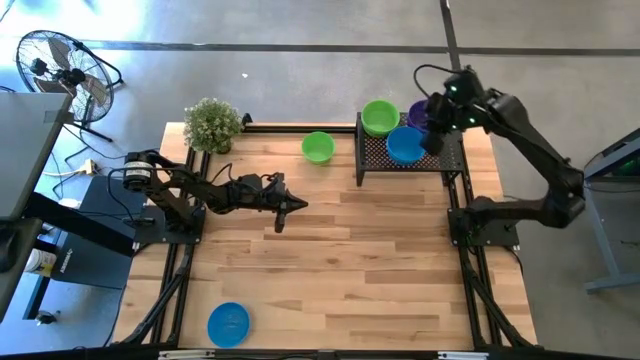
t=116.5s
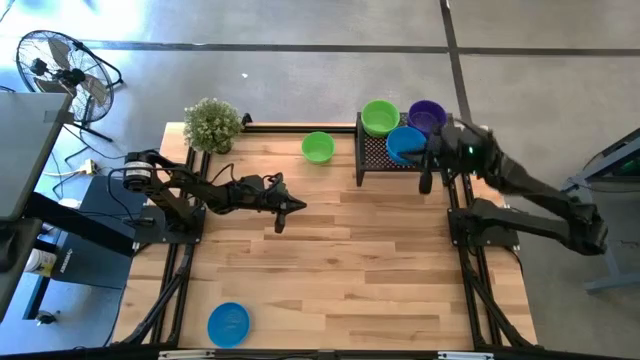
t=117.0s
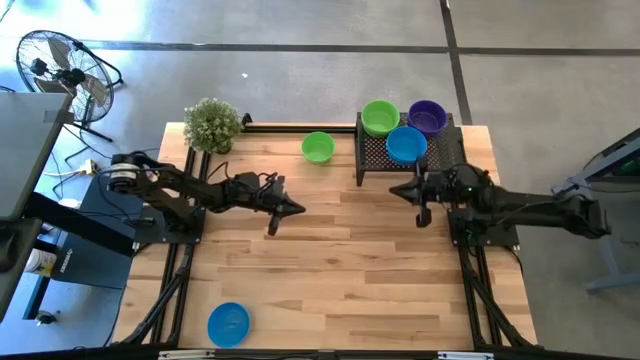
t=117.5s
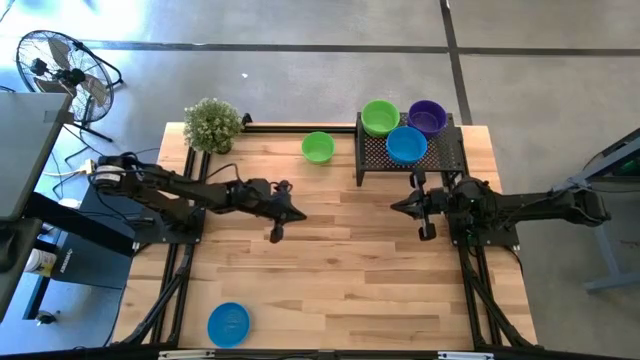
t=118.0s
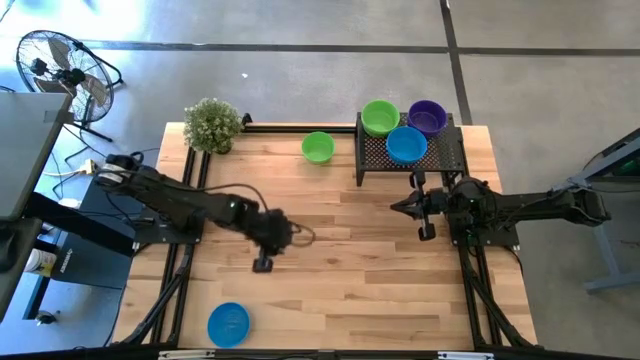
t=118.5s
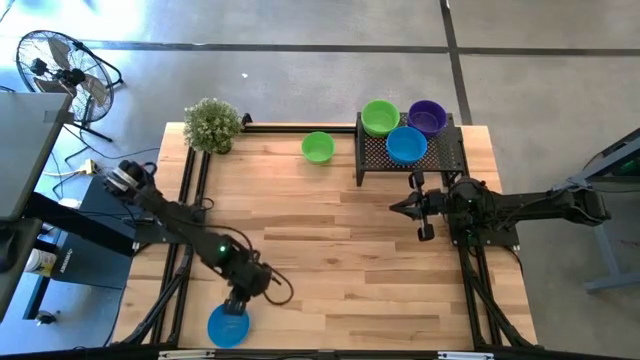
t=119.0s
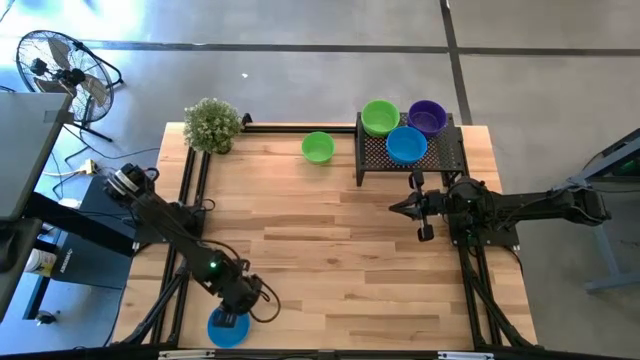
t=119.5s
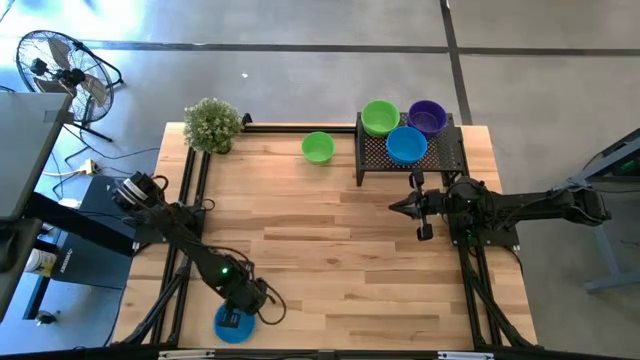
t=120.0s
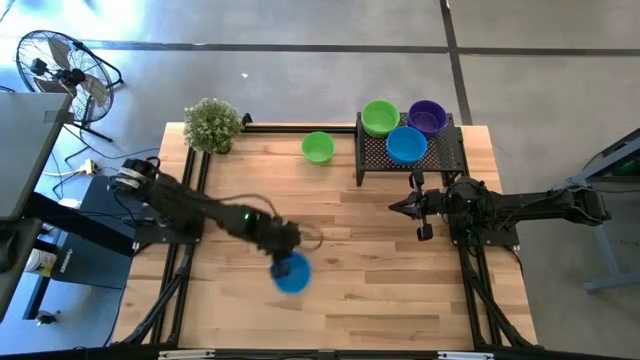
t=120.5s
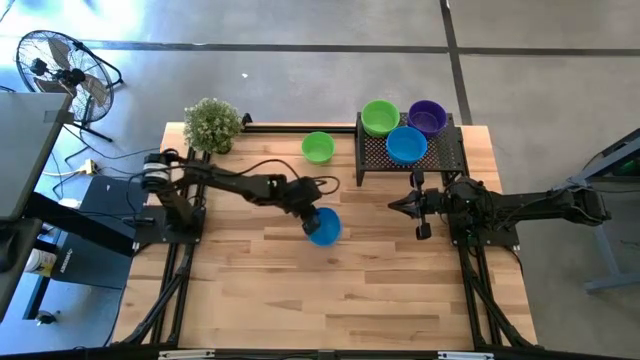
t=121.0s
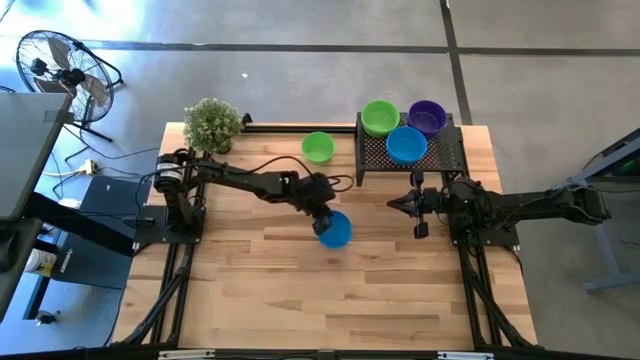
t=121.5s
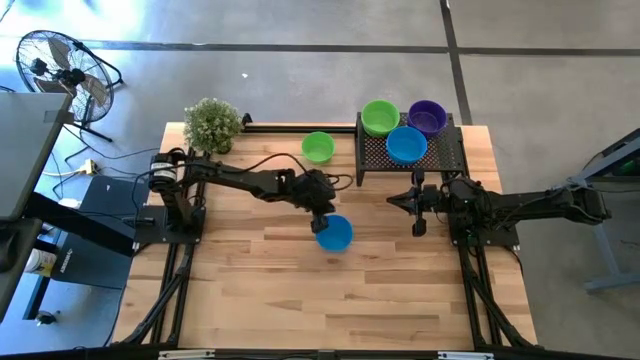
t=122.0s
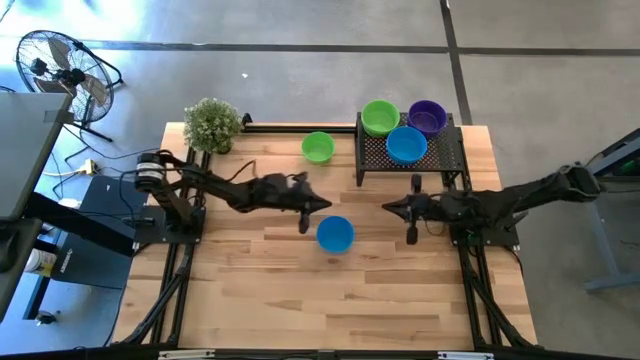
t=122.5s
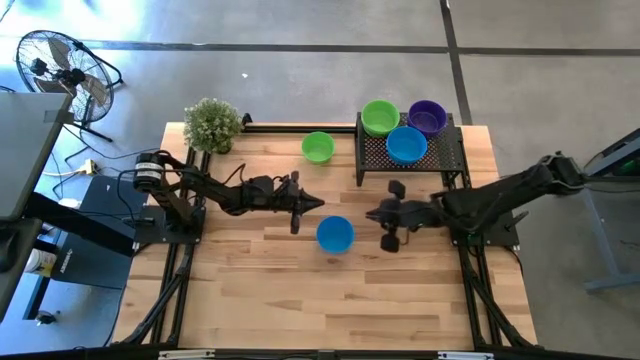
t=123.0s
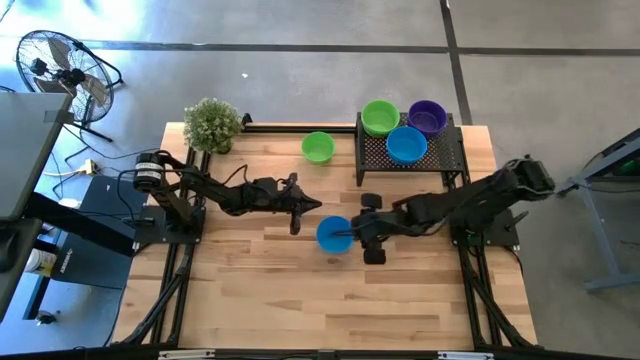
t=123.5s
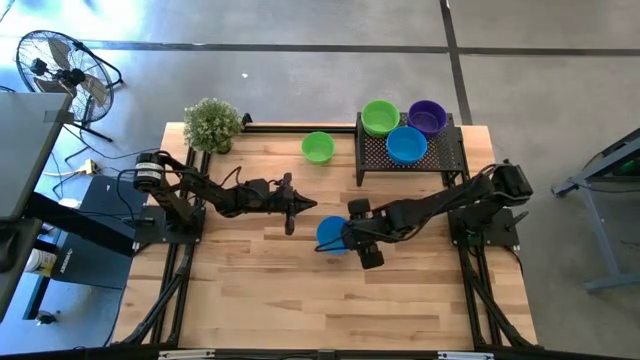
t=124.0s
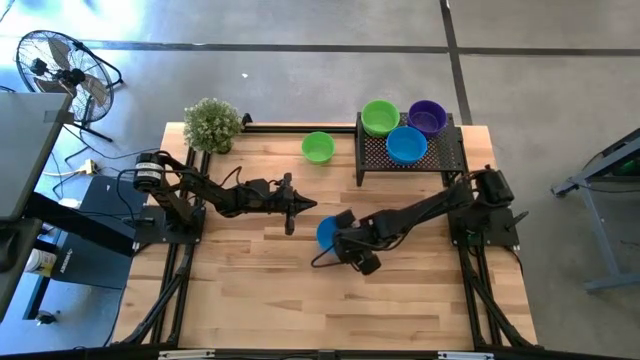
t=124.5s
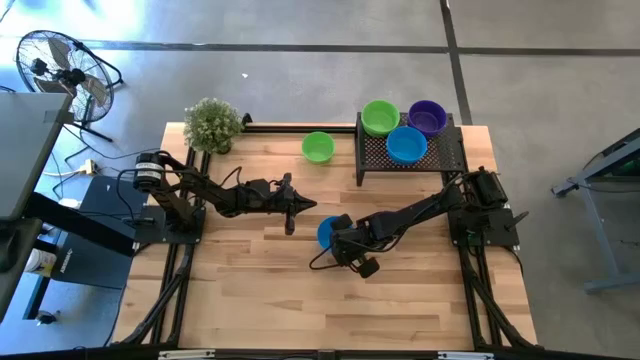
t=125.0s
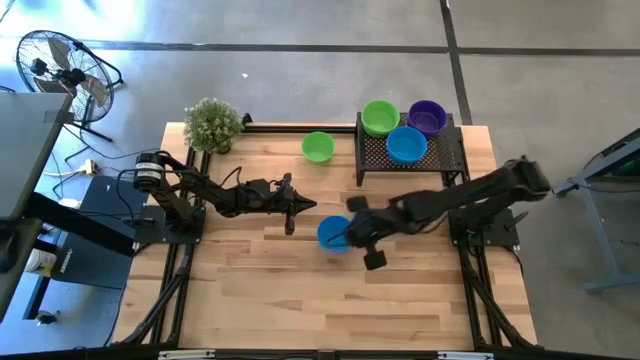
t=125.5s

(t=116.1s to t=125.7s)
Task: Pick & Place Mini bowls
Stack the blue bowl on the other blue bowls on the shelf

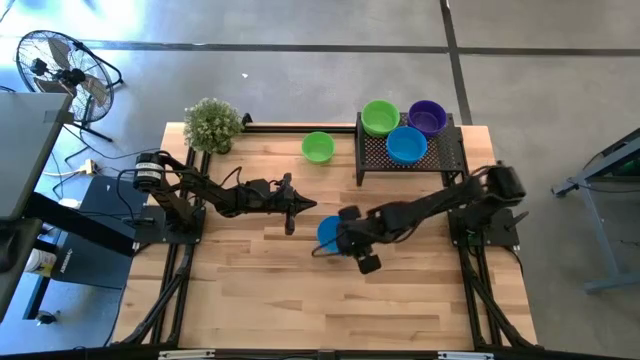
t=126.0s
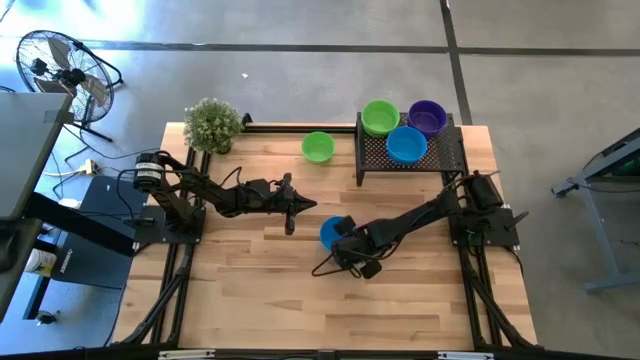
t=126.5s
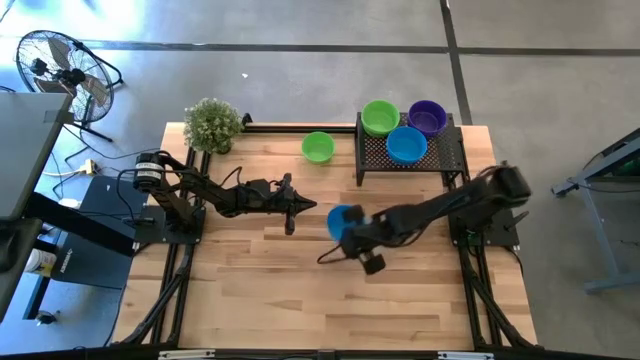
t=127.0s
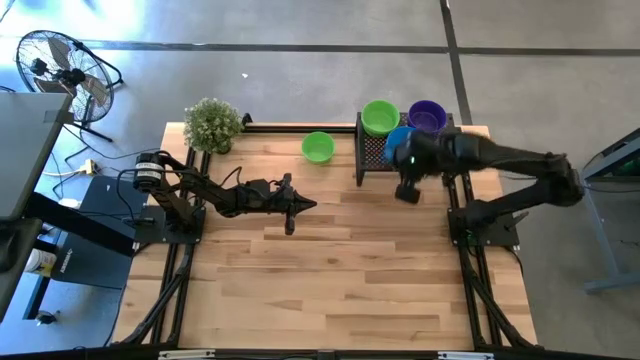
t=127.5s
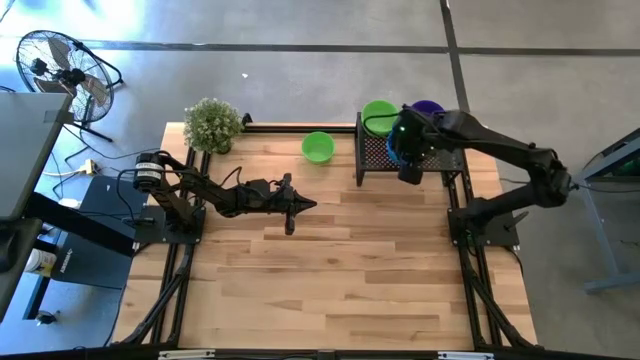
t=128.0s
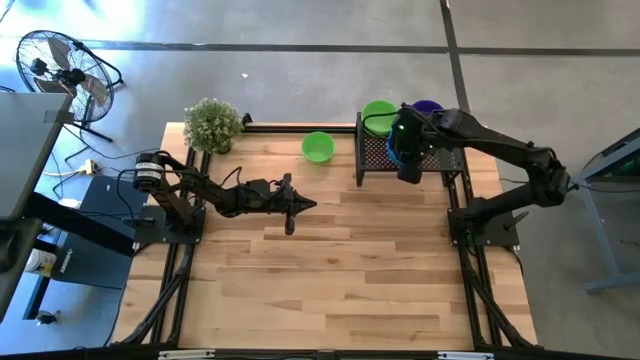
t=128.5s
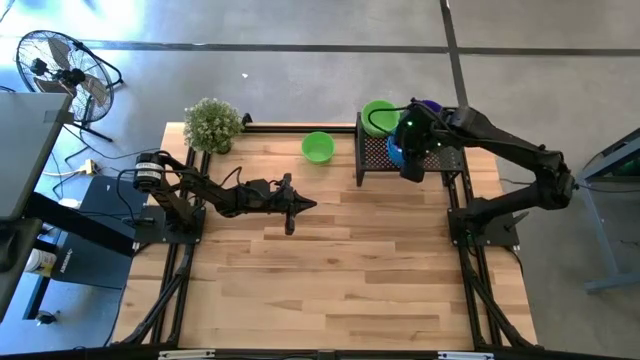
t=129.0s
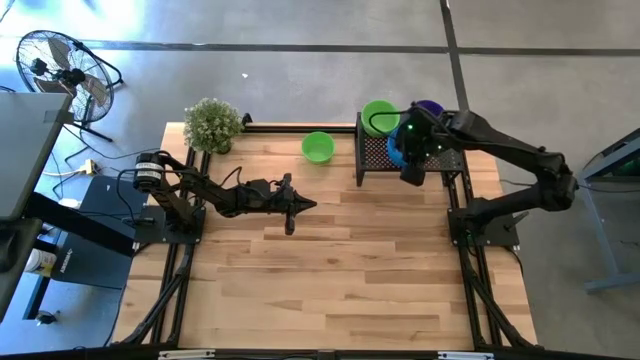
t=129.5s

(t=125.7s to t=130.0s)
Stack the blue bowl on the other blue bowls on the shelf

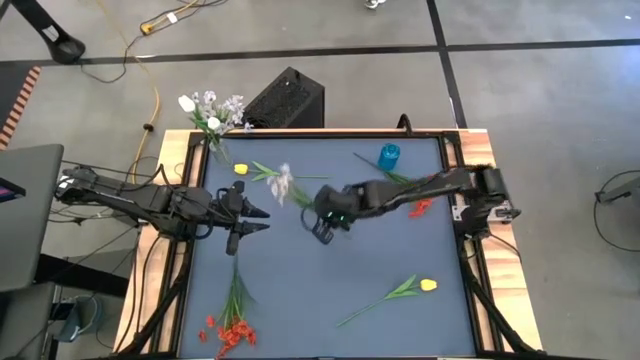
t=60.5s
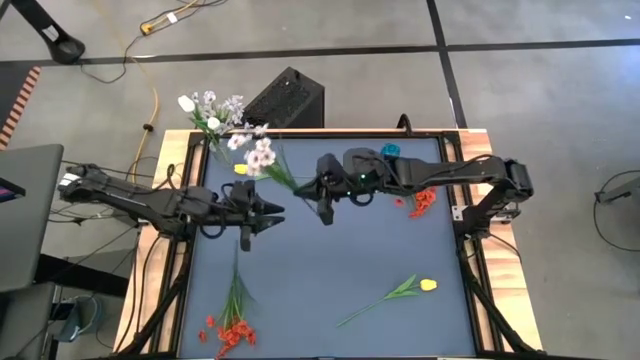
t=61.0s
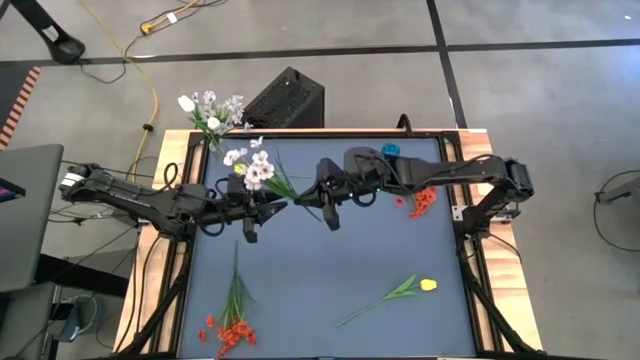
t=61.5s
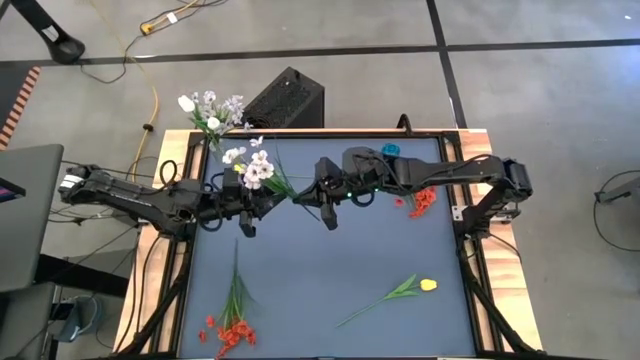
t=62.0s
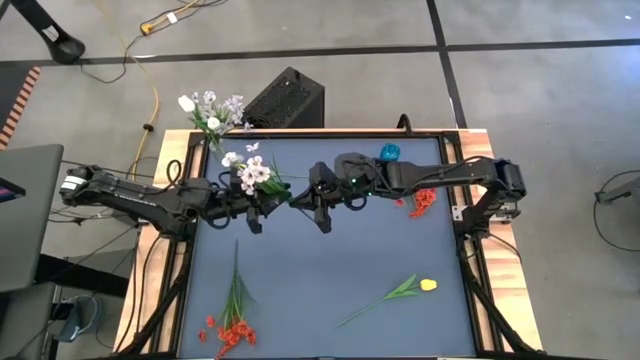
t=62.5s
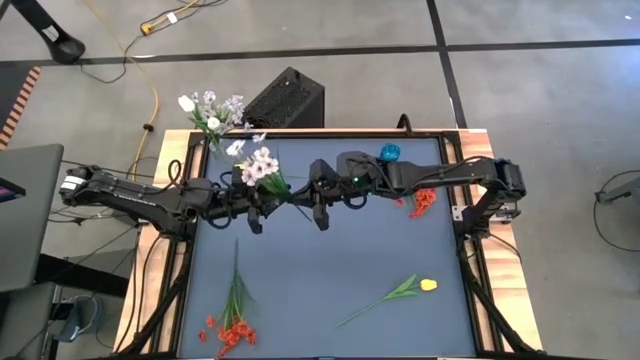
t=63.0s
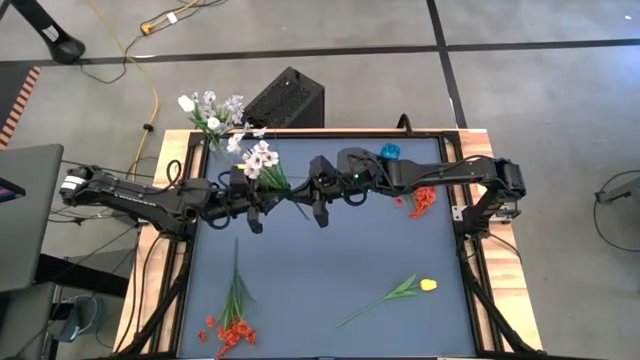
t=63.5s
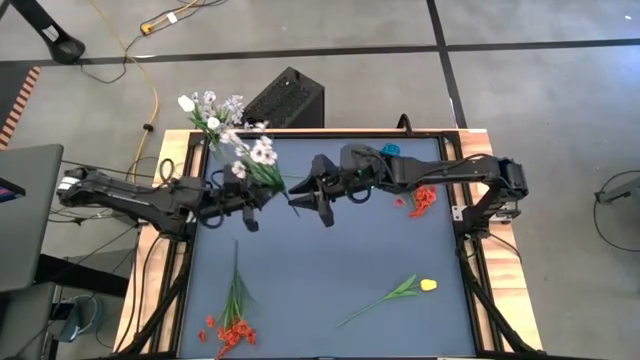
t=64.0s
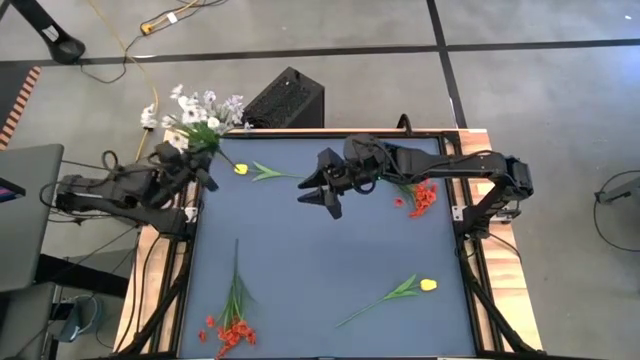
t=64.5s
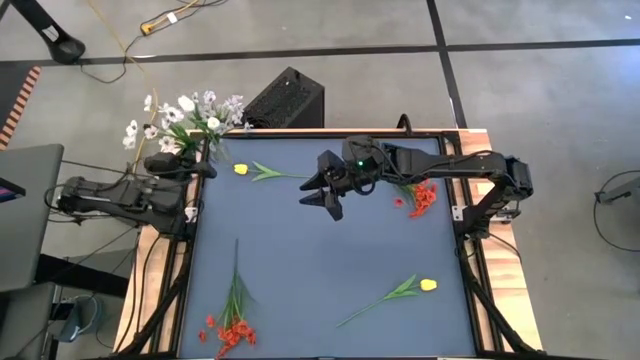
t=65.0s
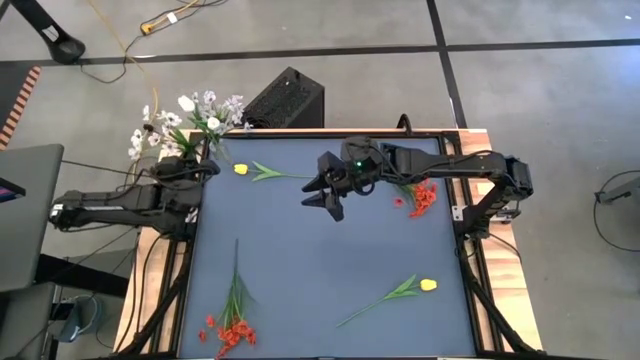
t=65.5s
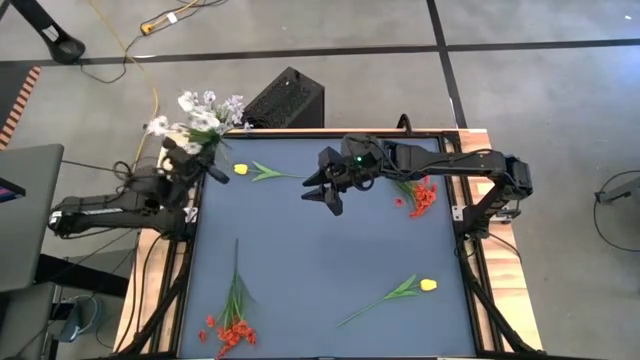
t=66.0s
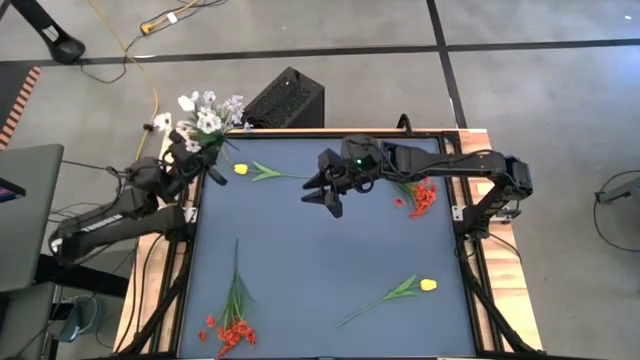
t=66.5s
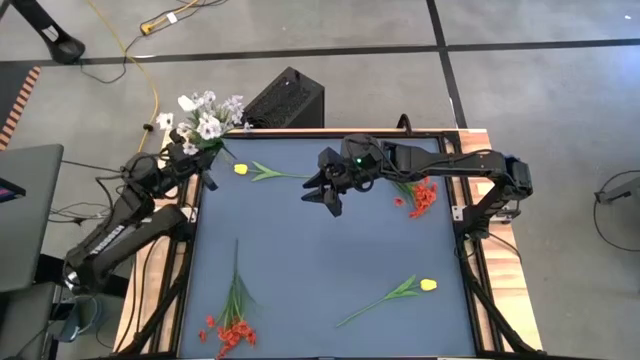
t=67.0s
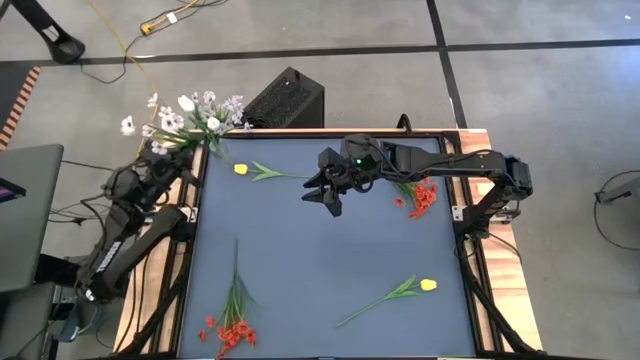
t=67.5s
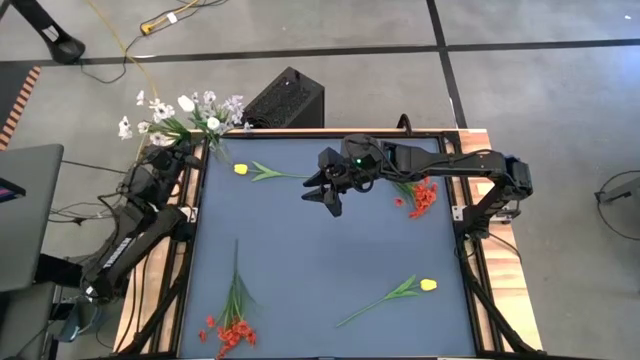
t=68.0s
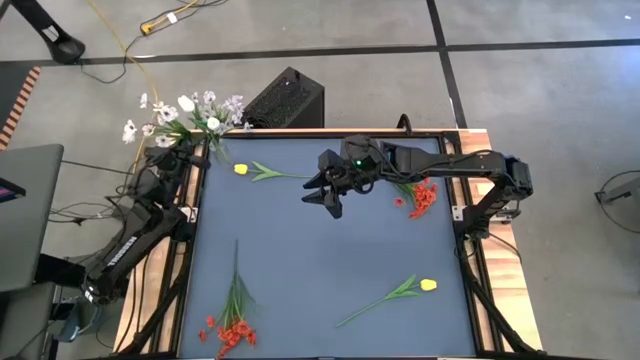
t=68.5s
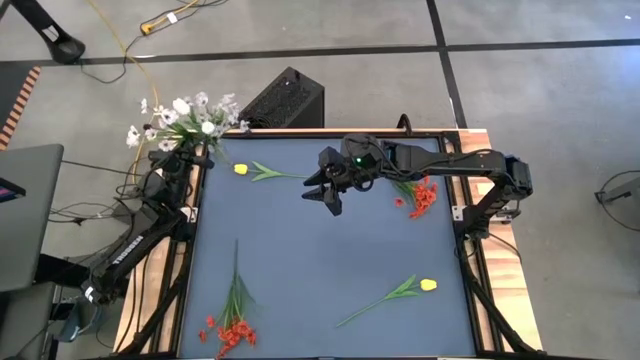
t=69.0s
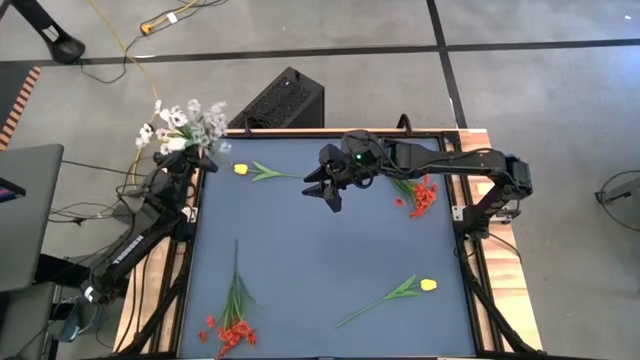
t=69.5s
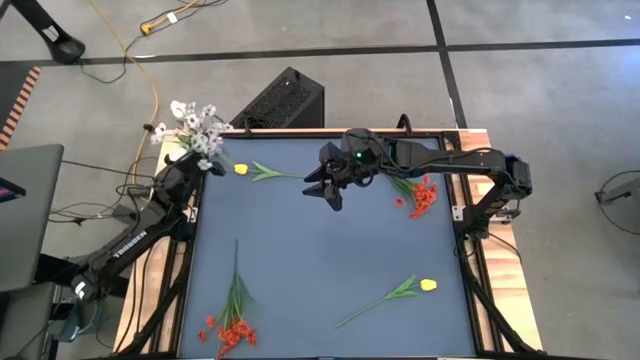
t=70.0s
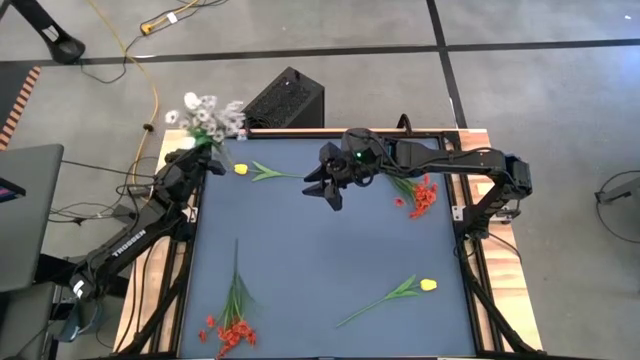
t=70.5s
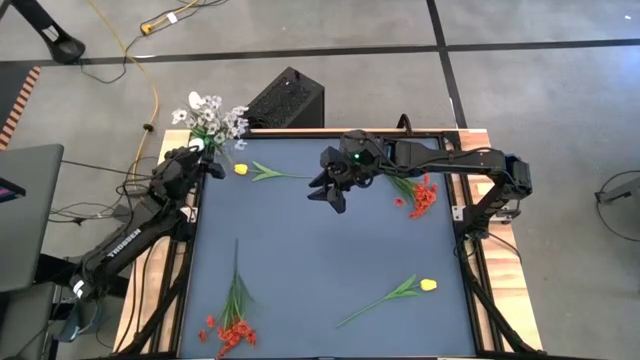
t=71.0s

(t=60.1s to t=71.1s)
Task: Sort flowers into vase by color
Put the white patterned flowers into the transparent vase
